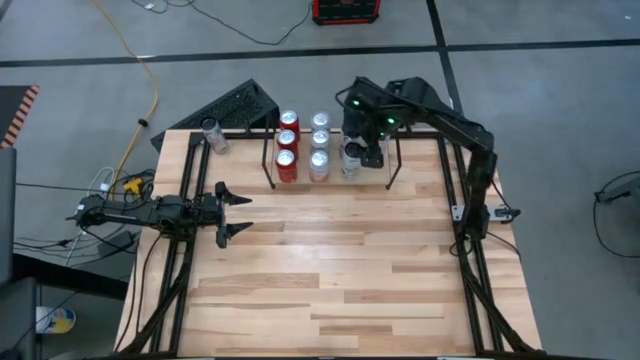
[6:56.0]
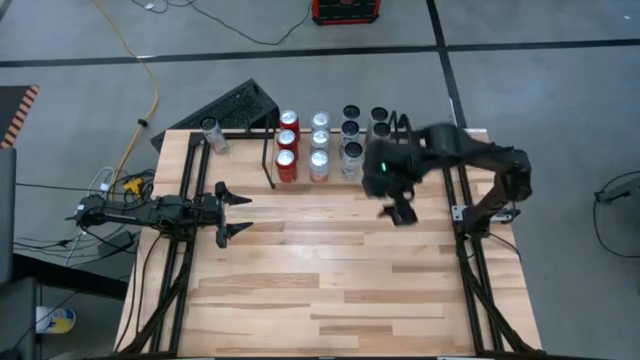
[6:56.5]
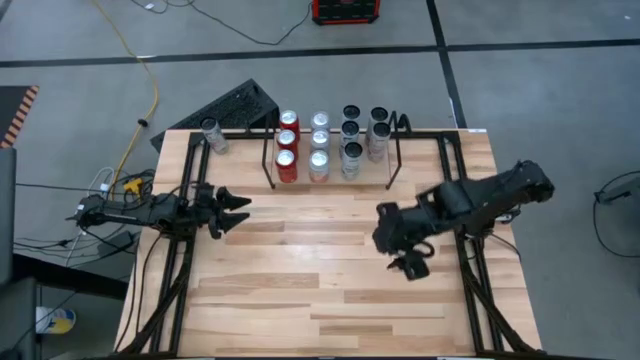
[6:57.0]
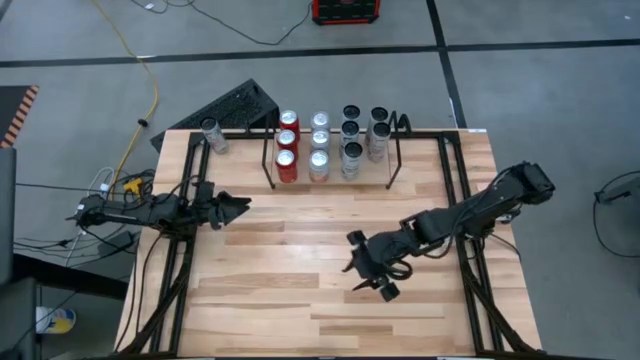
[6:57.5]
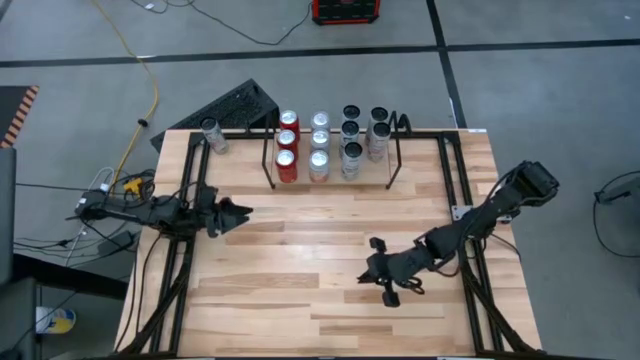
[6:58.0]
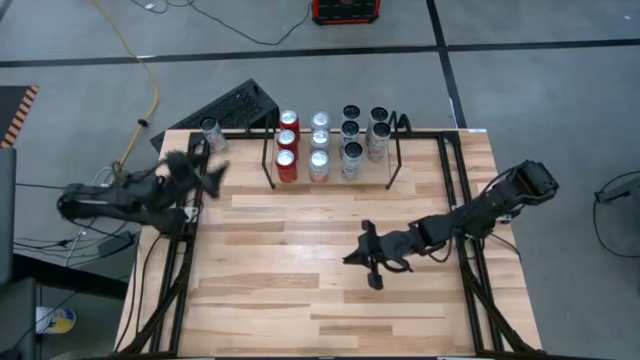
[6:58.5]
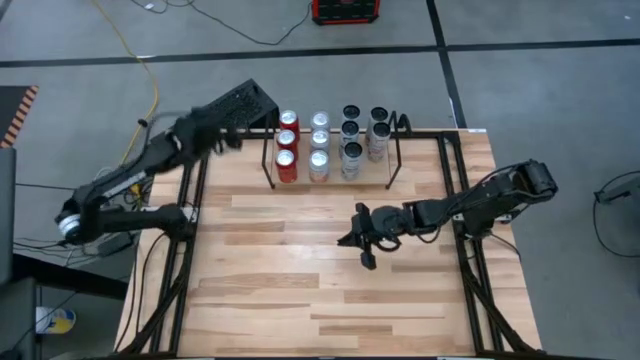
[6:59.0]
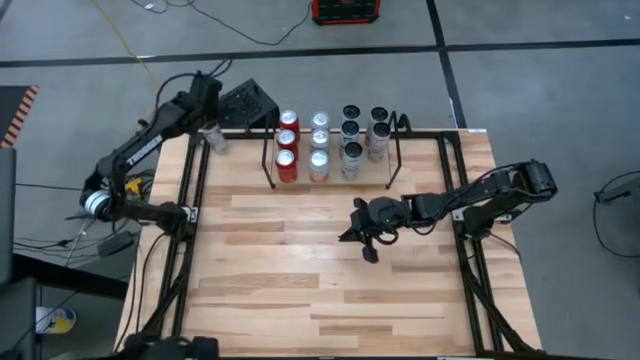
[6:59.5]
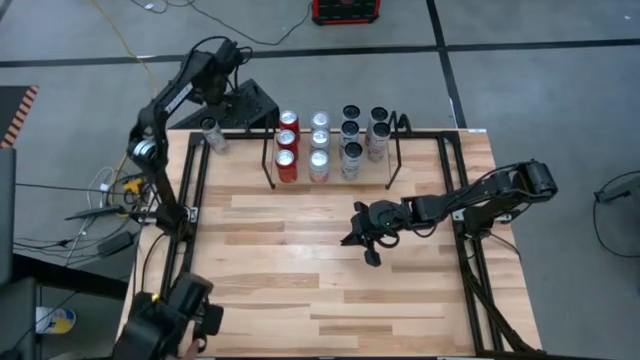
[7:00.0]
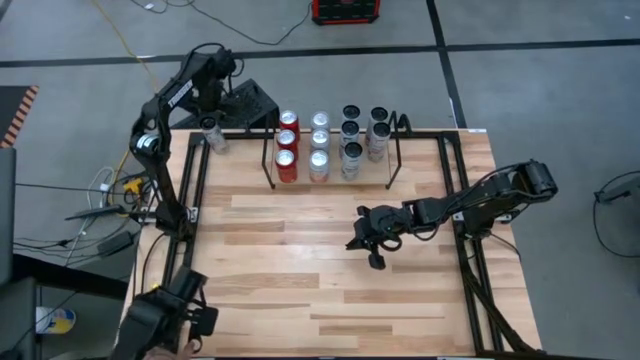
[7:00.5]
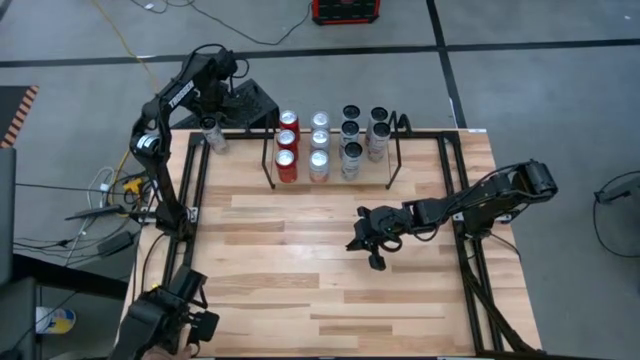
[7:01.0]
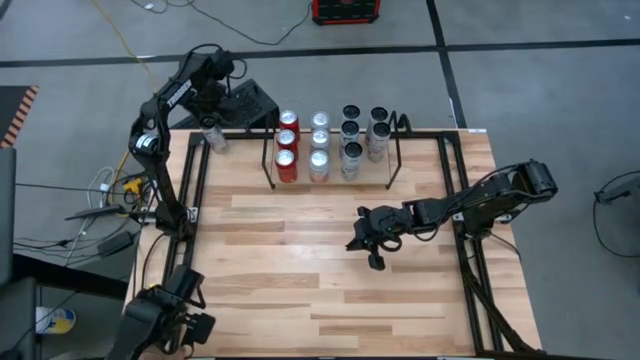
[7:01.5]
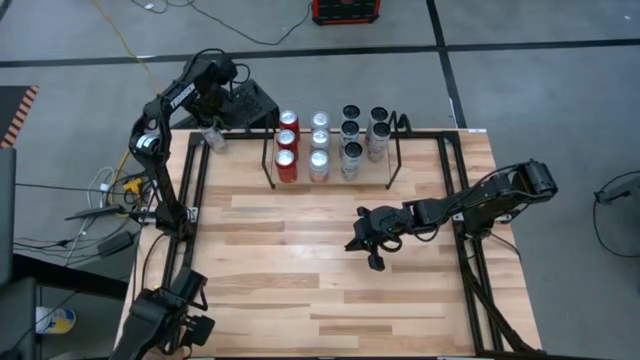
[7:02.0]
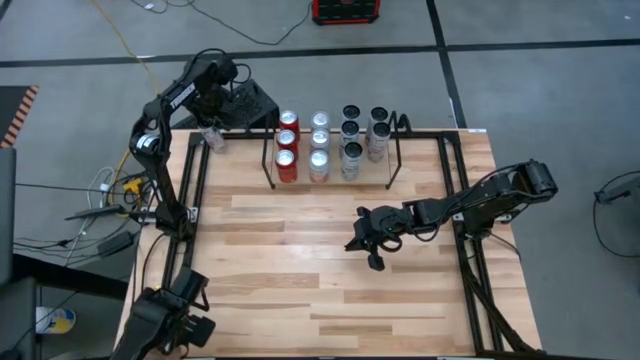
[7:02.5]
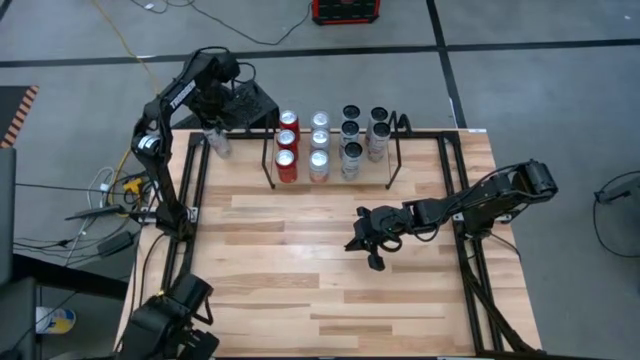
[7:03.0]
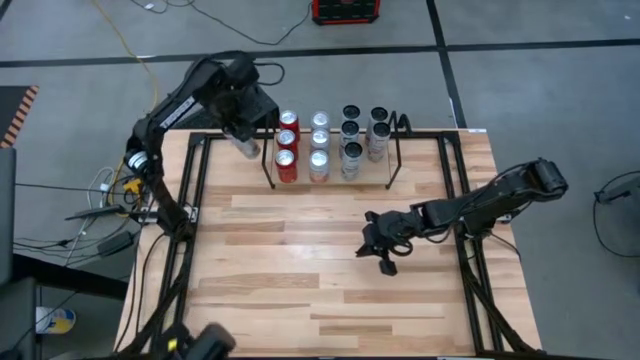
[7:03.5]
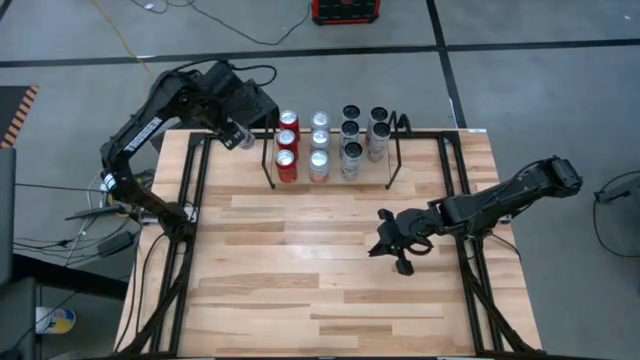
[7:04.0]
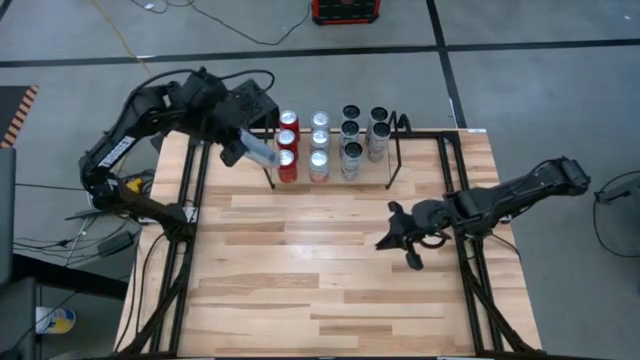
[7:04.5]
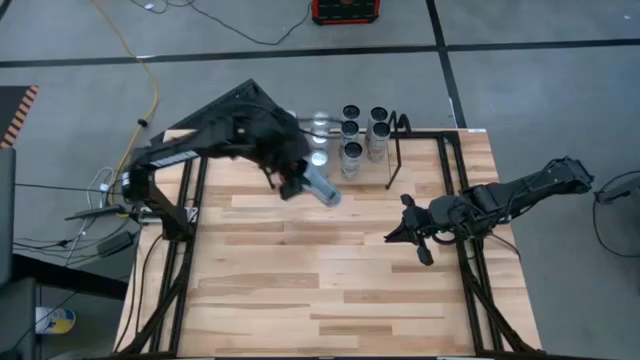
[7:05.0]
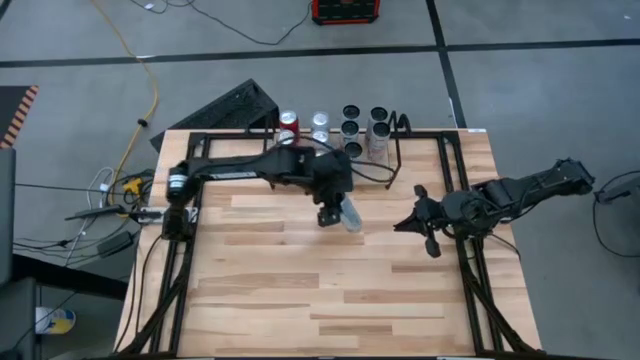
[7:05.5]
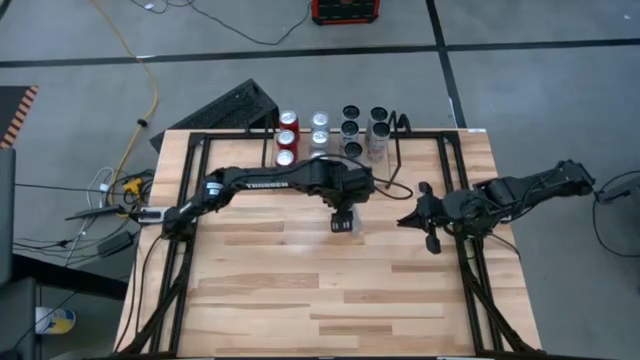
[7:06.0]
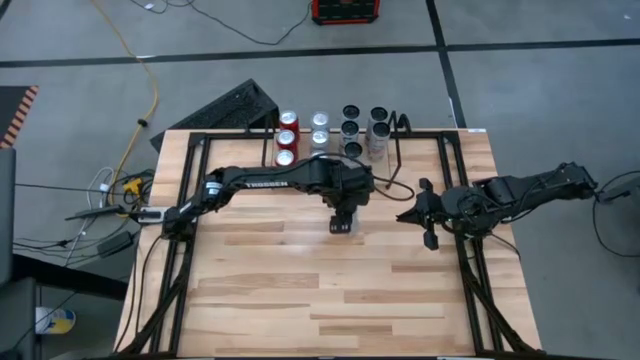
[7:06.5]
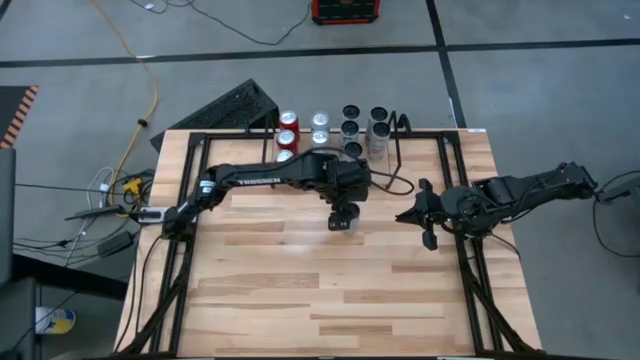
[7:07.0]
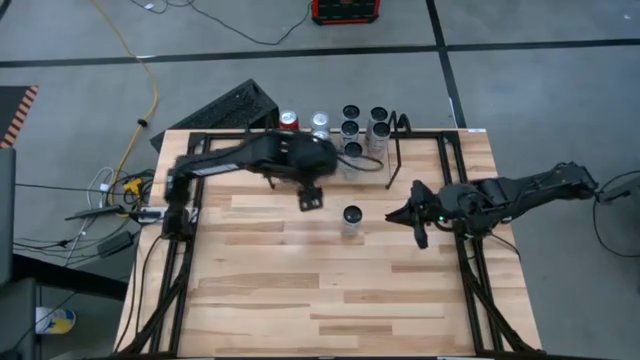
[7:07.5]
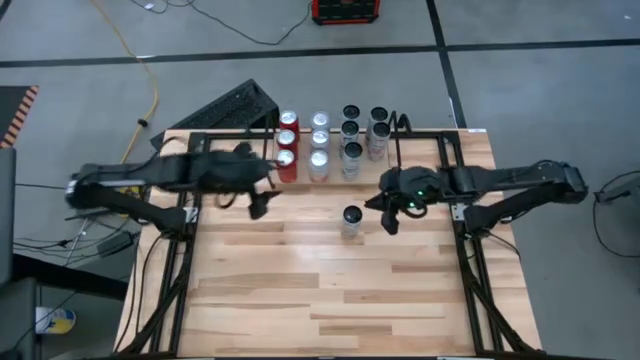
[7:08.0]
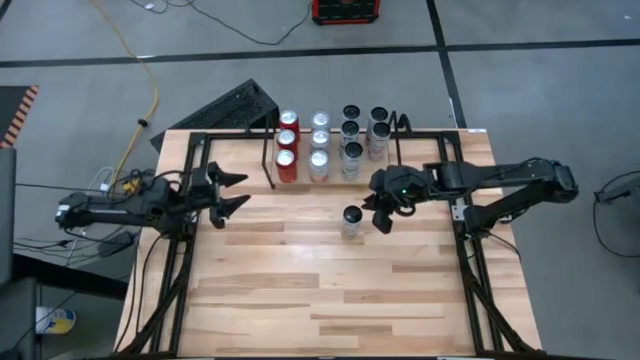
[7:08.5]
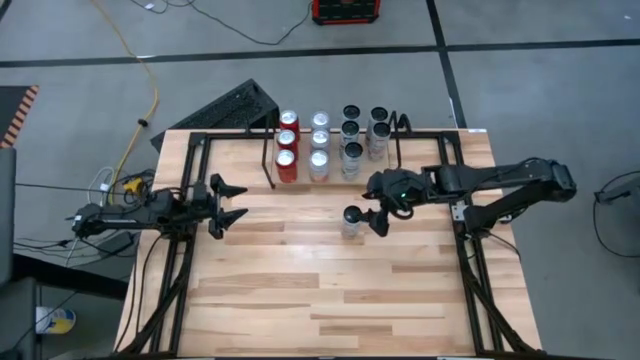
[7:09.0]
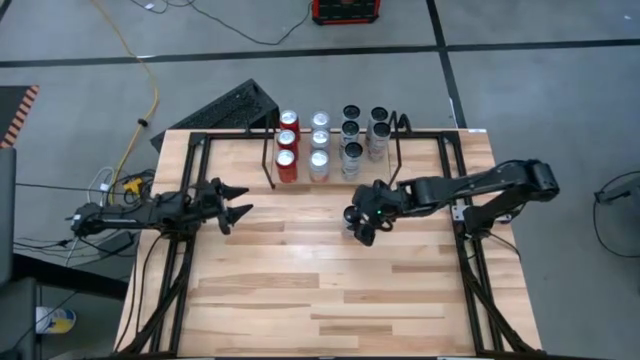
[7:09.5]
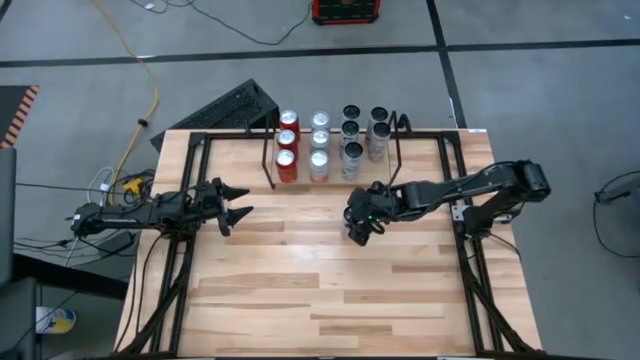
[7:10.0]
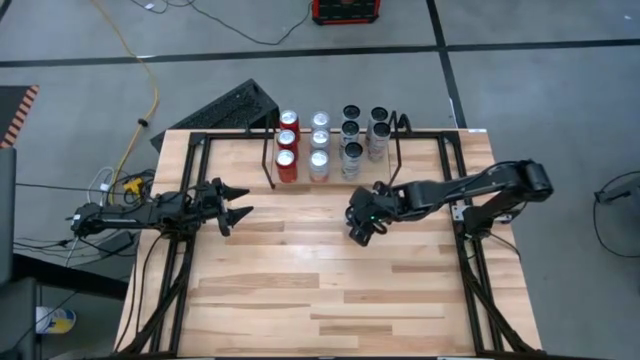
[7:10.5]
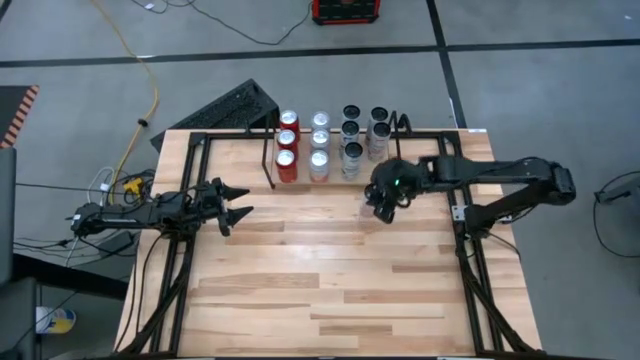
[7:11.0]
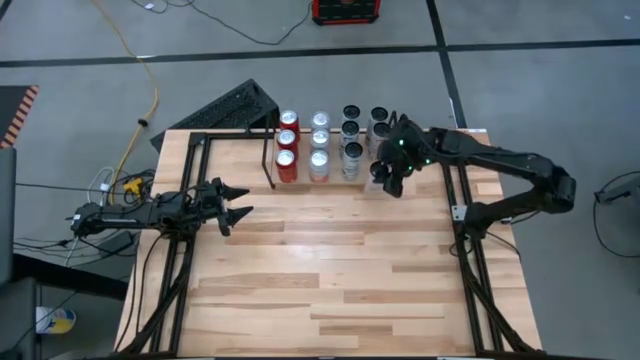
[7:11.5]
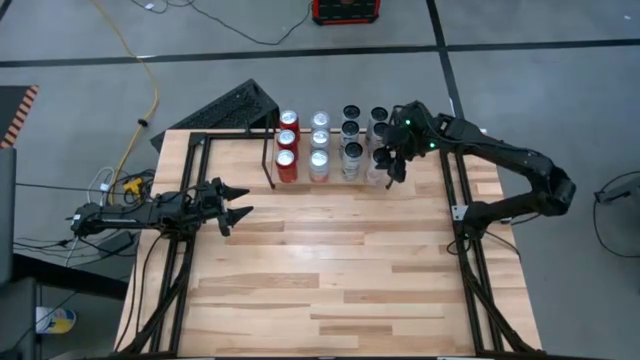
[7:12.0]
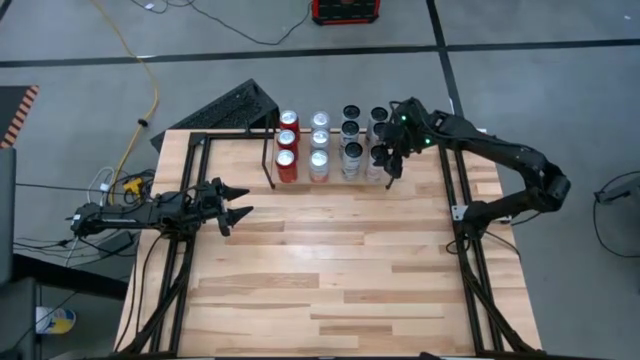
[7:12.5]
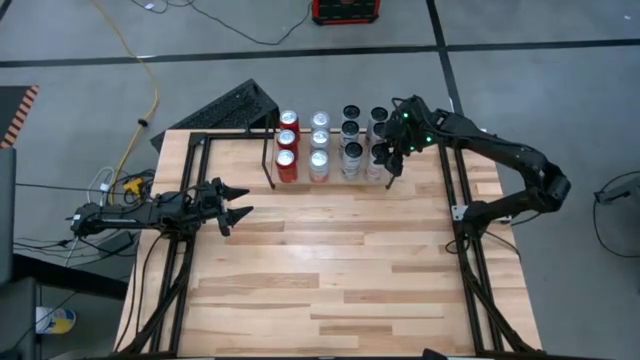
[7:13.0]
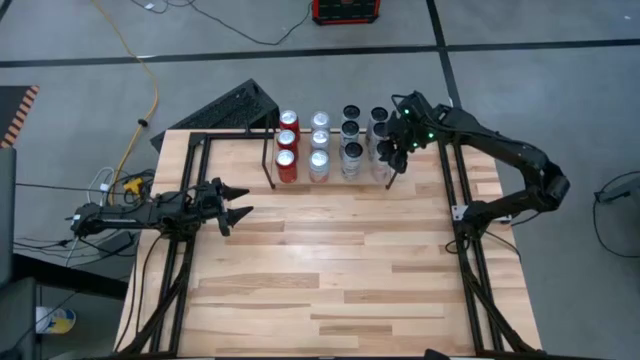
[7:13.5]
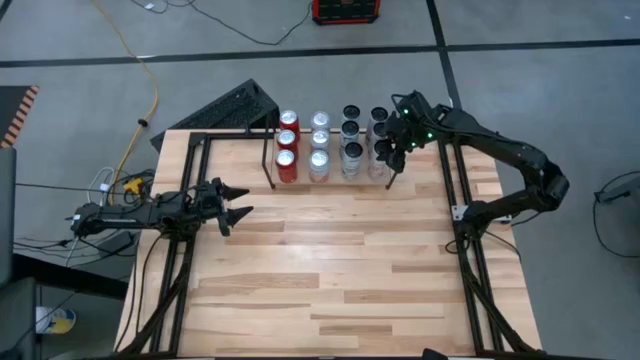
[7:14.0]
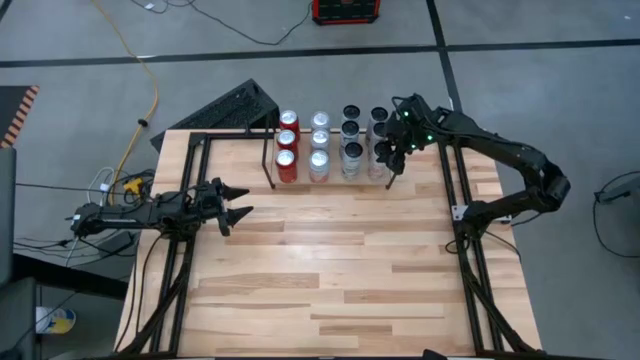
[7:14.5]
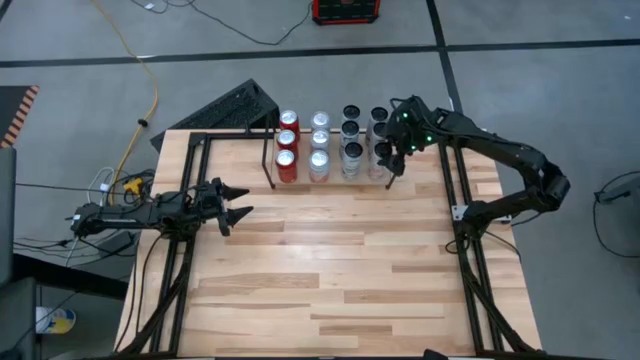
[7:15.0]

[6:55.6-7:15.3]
Task: Place canned beverage on shelf
Put the white pink soda can on the shelf aligned with the other white pink soda cans
